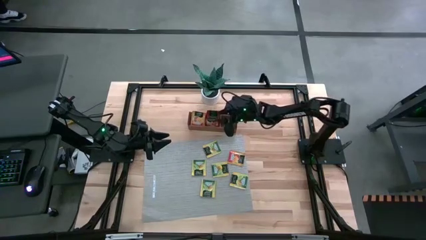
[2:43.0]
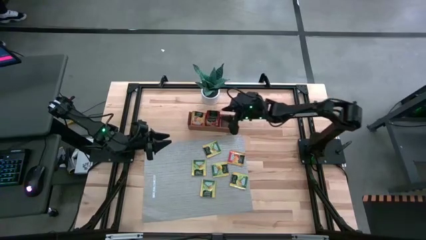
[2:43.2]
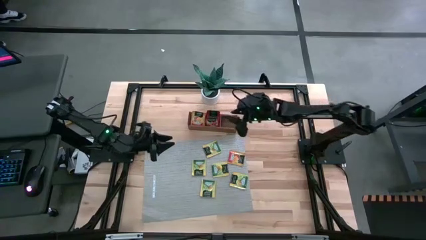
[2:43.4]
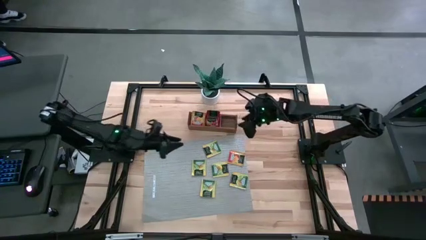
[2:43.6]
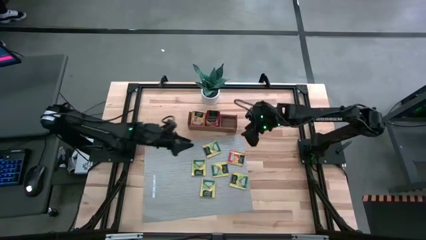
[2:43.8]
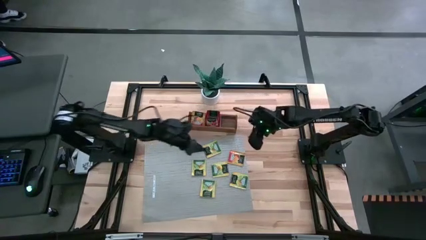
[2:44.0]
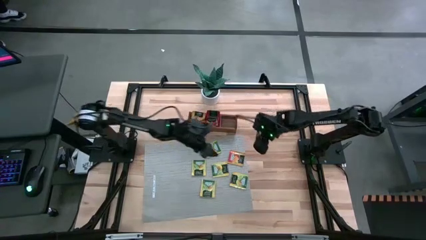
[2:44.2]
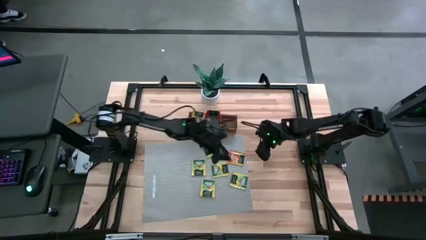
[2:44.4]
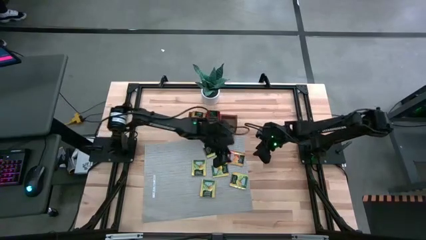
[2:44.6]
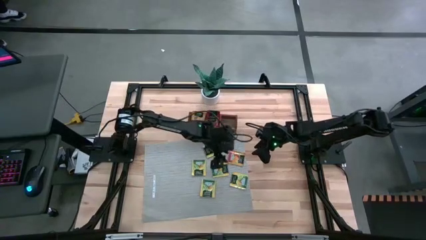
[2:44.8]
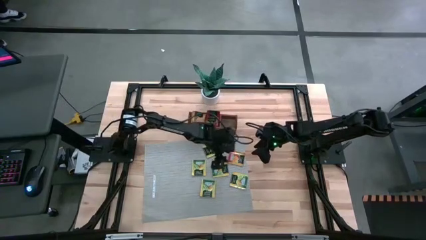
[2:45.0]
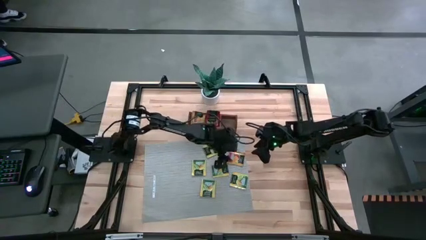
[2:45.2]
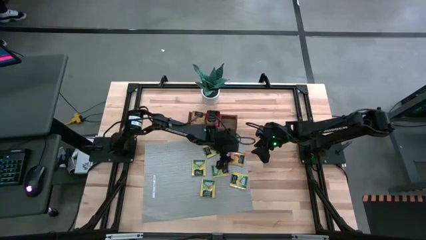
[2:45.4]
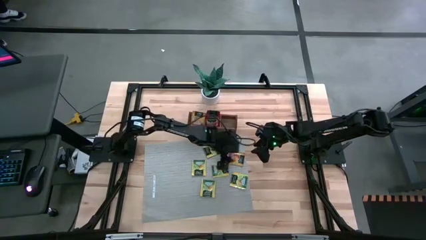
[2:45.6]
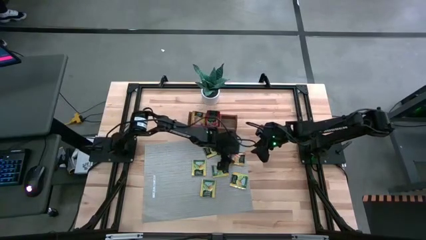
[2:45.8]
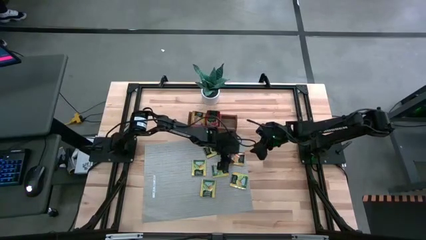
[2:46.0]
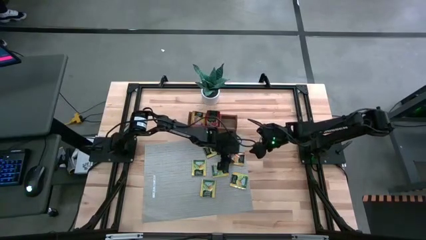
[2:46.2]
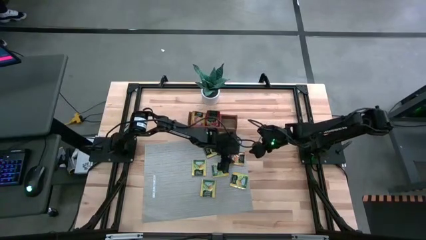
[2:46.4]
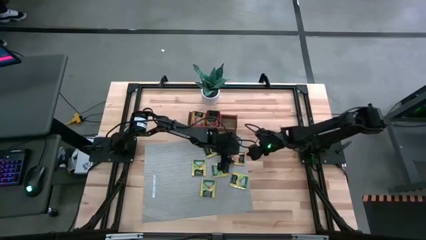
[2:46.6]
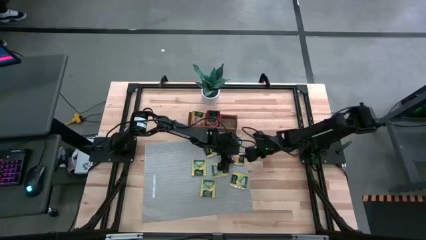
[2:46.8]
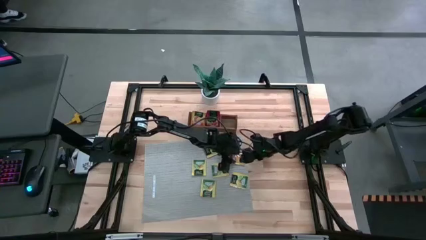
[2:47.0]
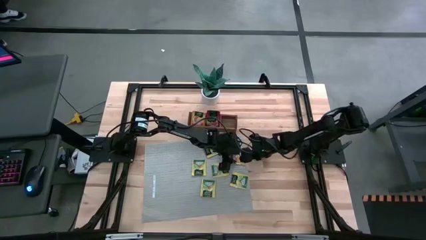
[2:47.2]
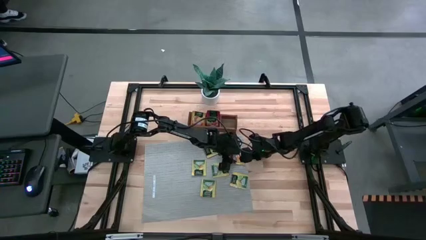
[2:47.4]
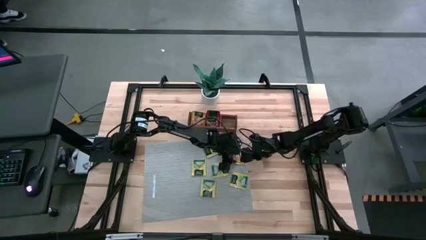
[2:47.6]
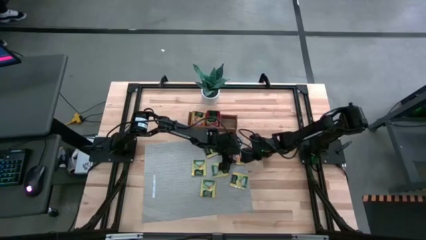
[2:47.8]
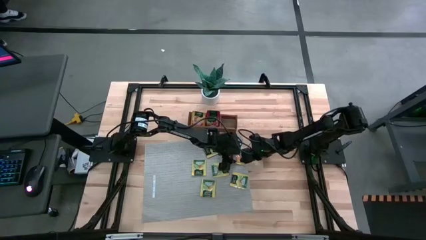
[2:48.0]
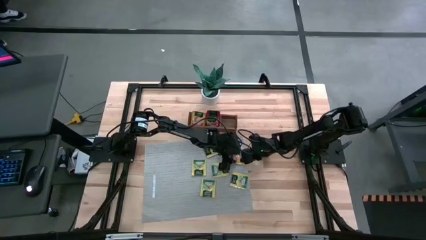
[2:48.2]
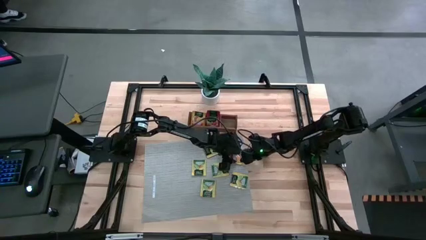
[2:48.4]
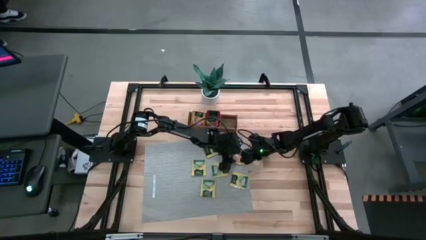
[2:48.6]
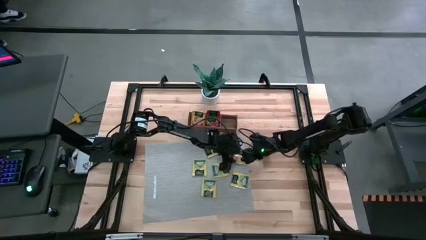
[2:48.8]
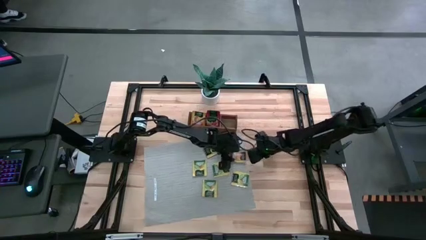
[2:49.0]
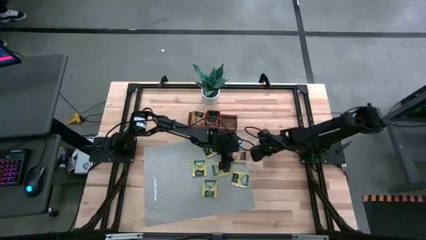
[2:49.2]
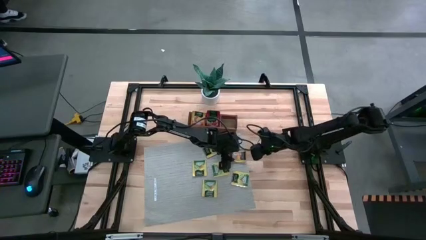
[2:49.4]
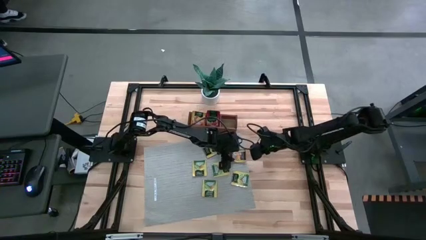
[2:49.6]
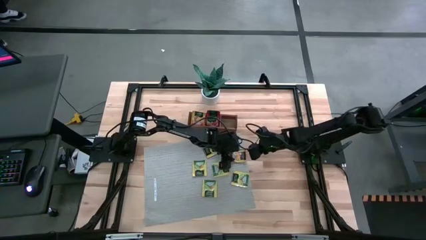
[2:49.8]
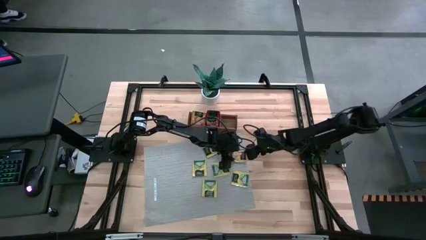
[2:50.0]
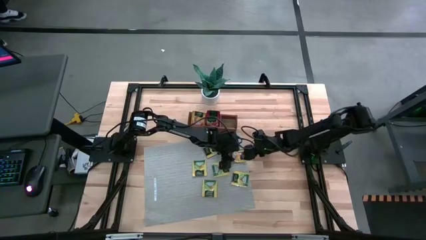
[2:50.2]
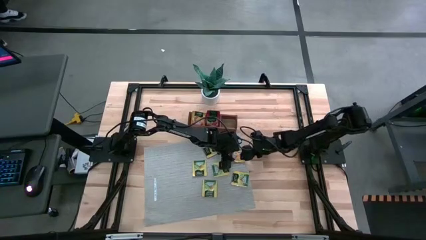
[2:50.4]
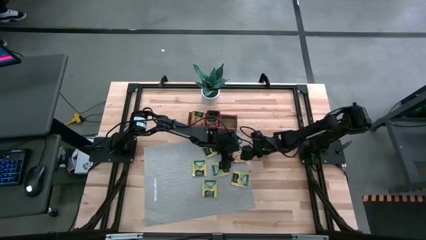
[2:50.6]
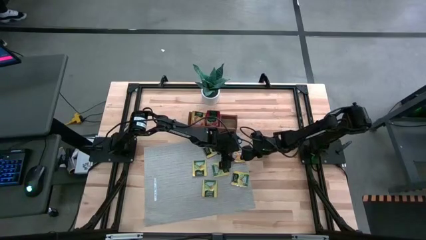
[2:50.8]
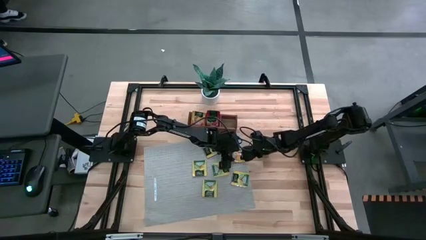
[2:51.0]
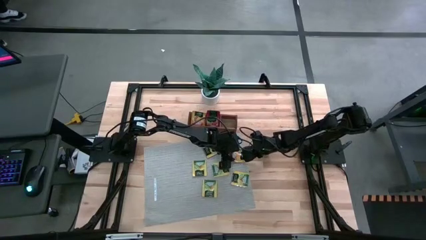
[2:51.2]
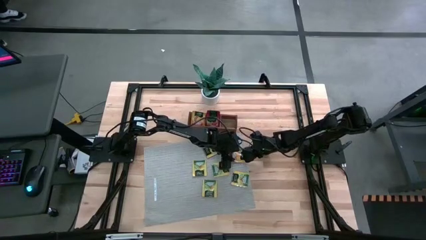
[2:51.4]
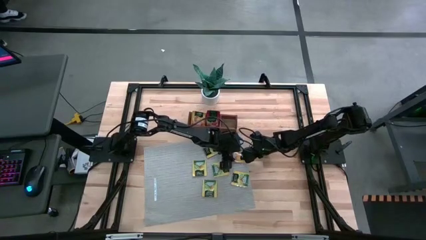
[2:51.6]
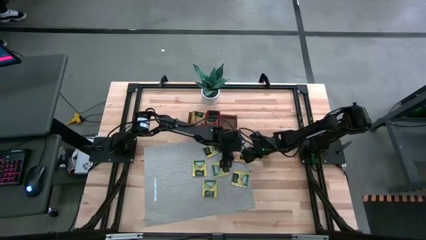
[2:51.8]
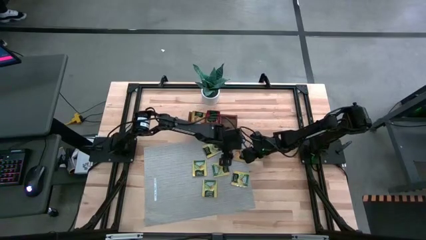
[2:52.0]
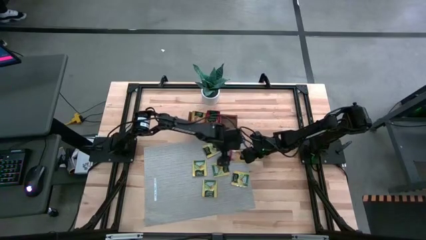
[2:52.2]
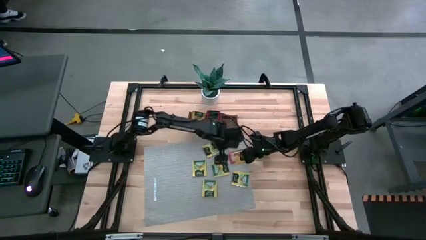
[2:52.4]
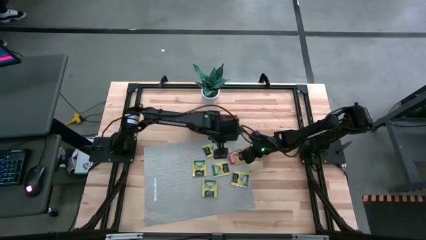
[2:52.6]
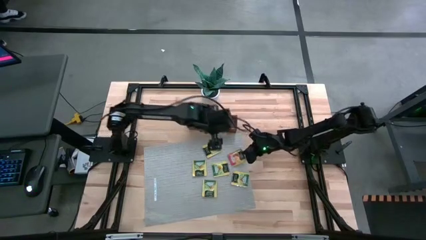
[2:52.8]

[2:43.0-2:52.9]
Task: Pick & Place Tea
Put the orange tea bag into the left section of the wooden organizer

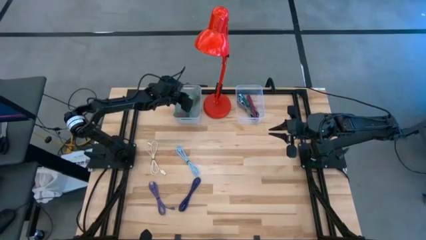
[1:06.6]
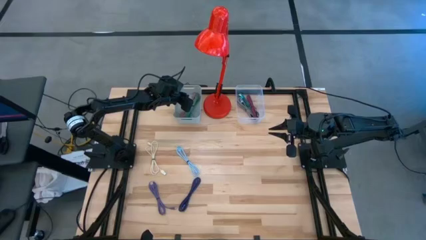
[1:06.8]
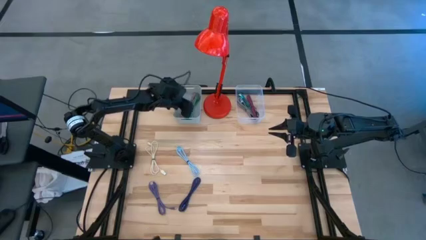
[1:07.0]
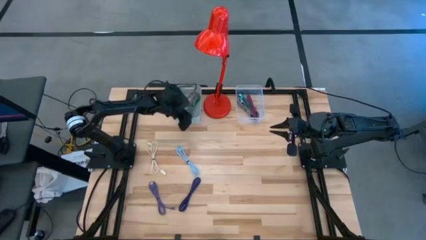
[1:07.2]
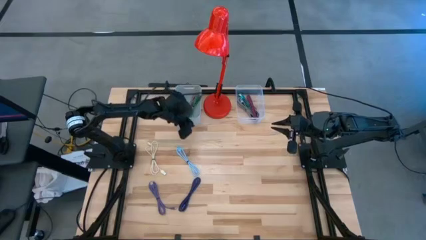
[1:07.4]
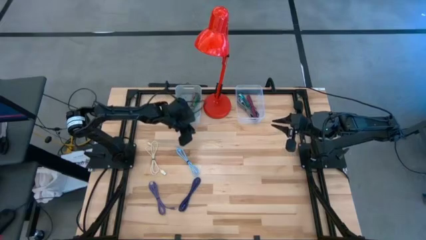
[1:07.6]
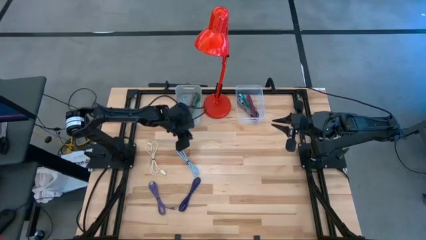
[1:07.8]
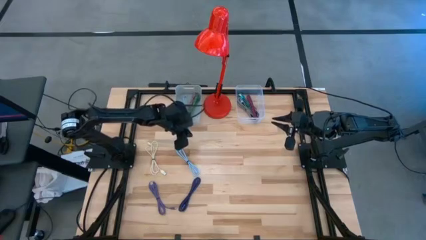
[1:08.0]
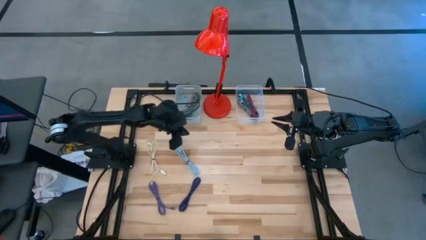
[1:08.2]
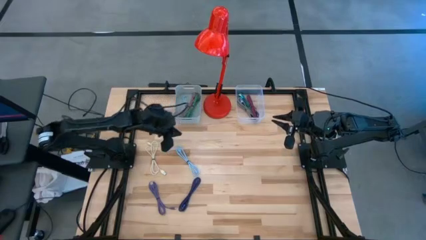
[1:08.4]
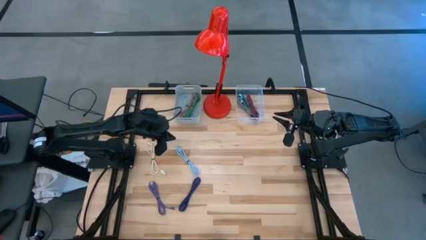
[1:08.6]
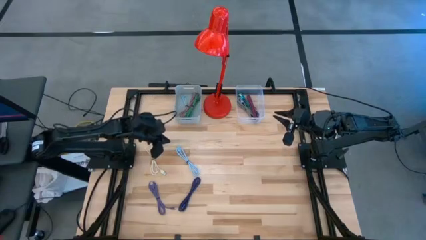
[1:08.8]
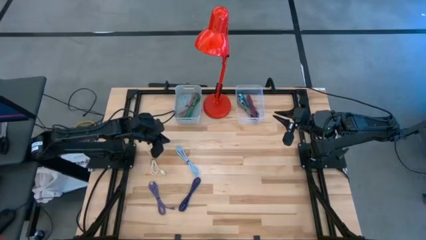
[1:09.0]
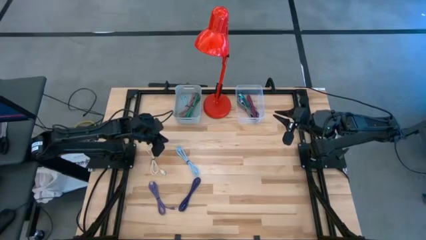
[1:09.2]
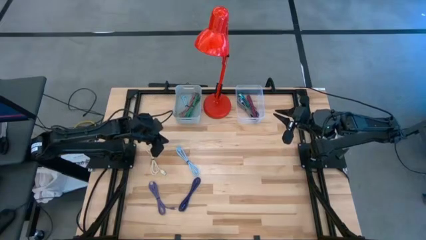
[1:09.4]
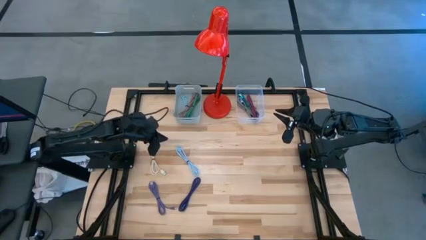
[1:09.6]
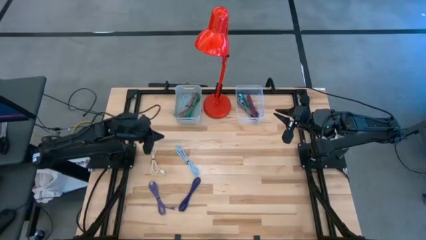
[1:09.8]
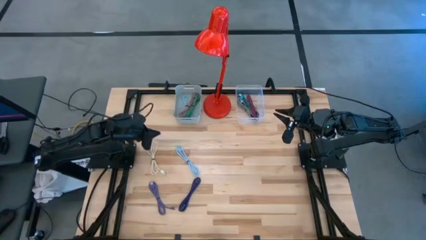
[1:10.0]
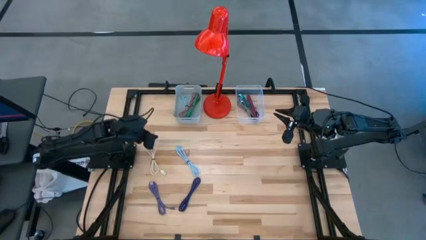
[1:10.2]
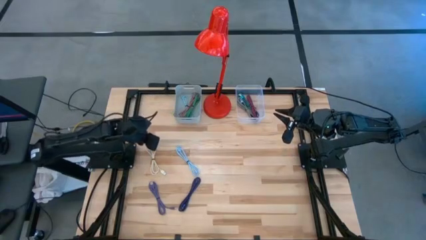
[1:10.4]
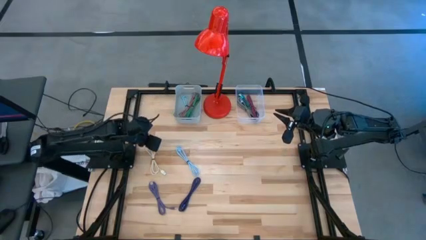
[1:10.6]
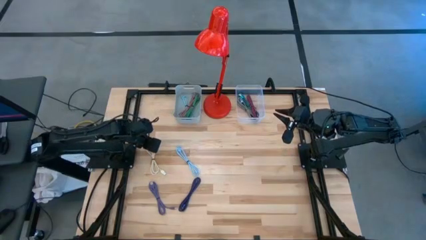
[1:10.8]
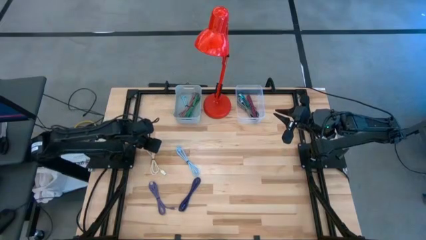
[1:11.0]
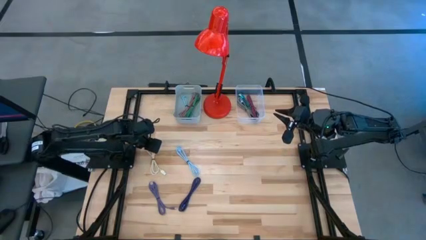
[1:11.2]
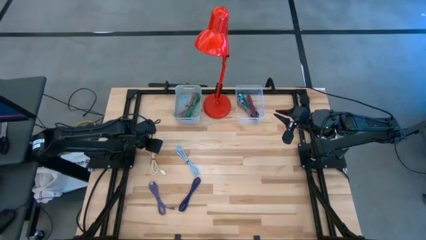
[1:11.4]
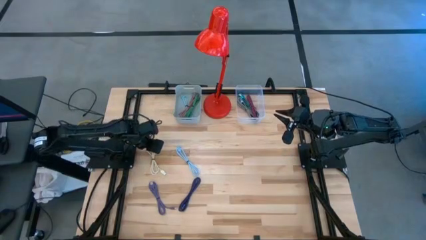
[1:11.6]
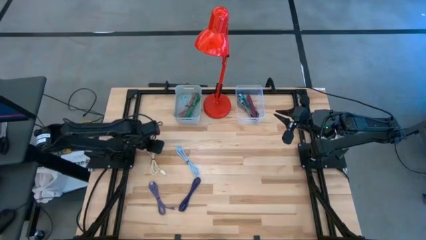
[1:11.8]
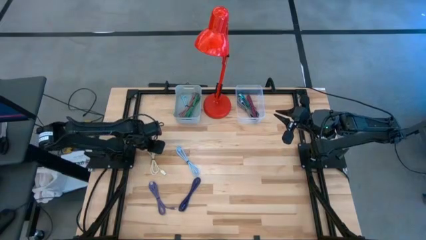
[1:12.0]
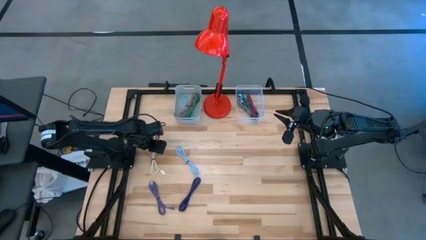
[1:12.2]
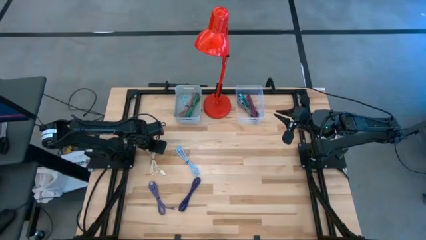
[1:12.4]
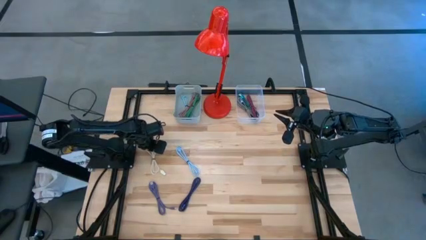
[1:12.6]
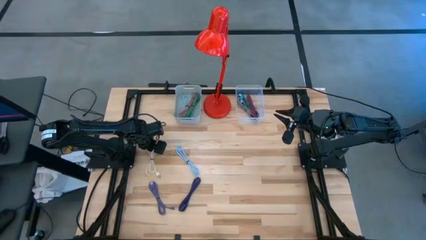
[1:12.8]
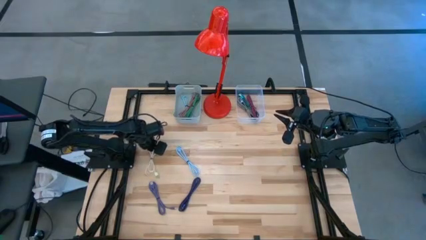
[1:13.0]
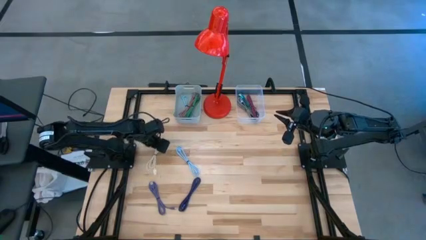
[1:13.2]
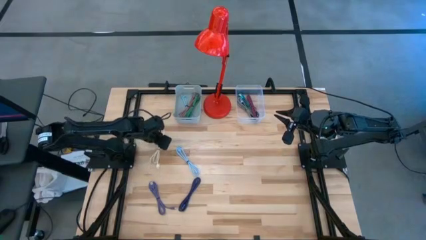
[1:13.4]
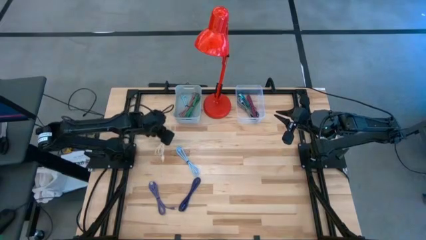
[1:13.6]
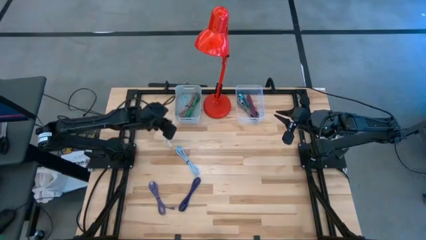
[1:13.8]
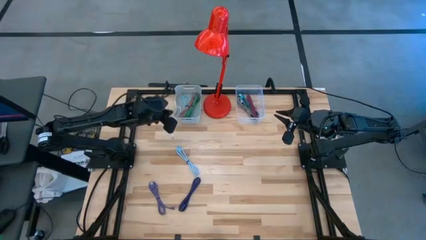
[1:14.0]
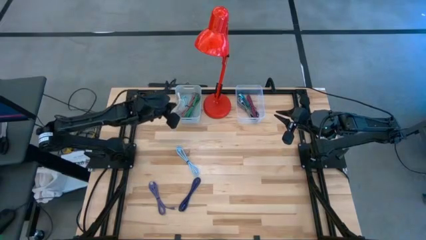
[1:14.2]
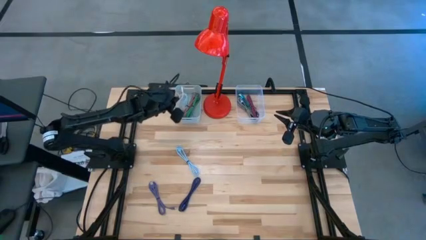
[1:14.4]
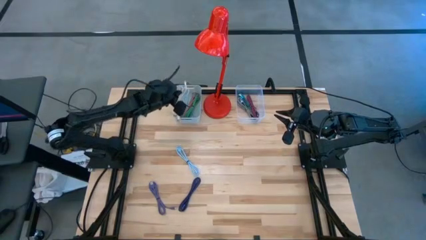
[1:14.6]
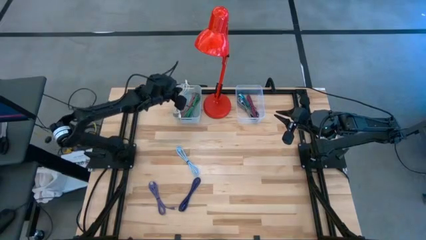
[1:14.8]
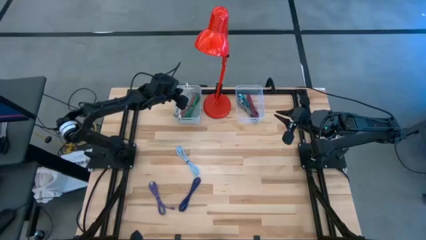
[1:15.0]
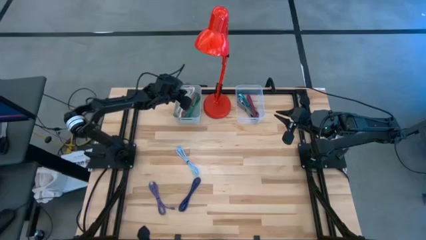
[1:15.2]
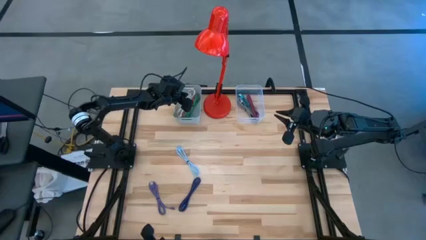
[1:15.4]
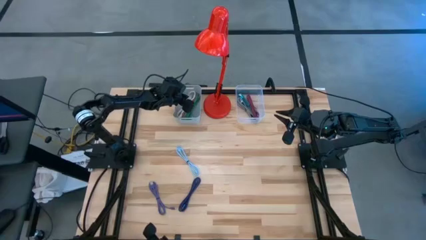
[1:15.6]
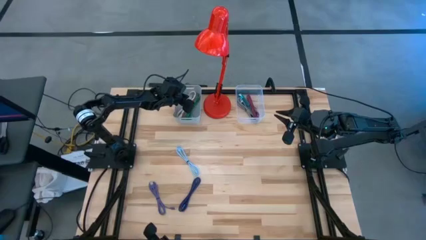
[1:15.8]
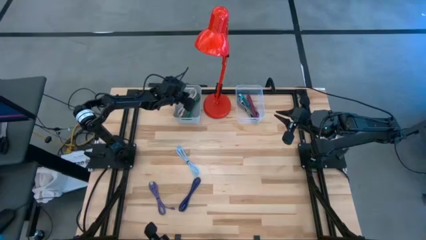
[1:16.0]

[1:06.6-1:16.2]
Task: Pick & Place USB Port
Put the white charger cable into the gray bin
